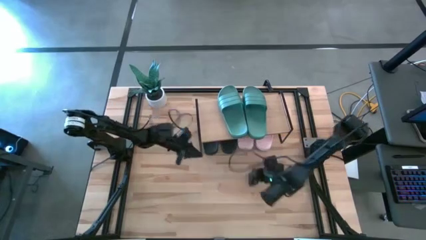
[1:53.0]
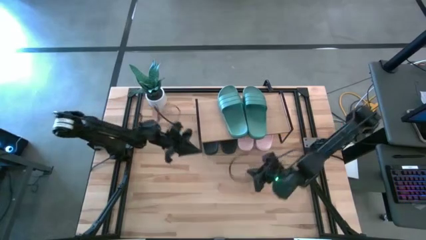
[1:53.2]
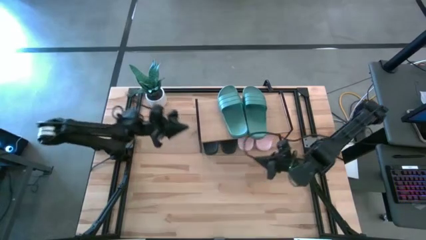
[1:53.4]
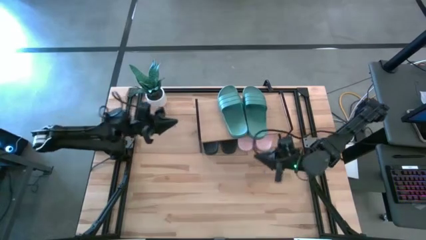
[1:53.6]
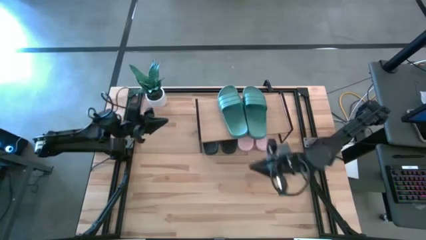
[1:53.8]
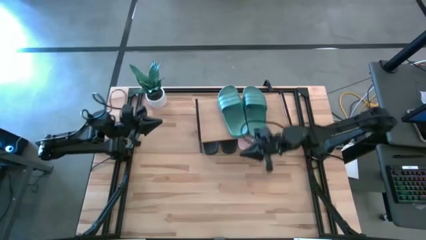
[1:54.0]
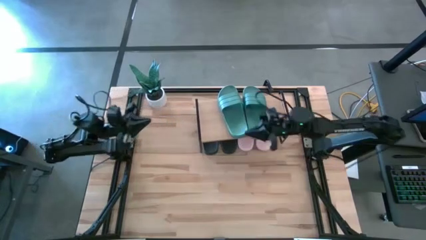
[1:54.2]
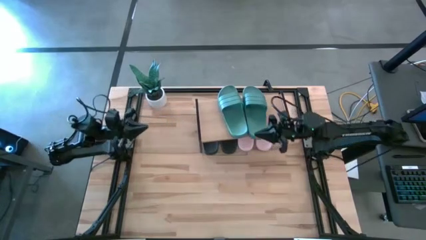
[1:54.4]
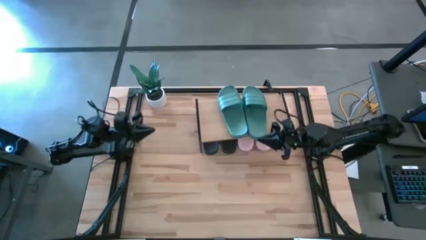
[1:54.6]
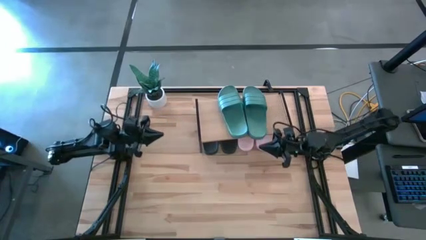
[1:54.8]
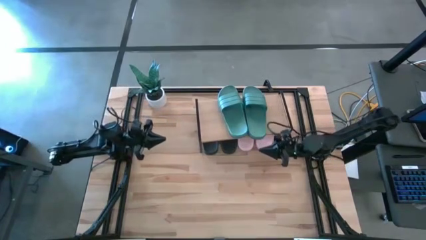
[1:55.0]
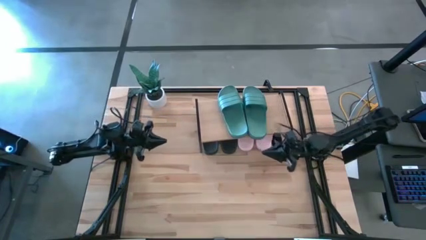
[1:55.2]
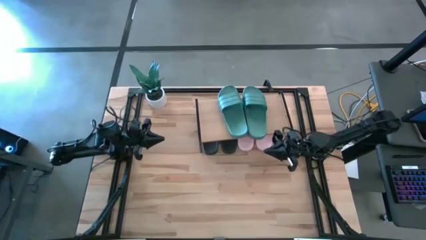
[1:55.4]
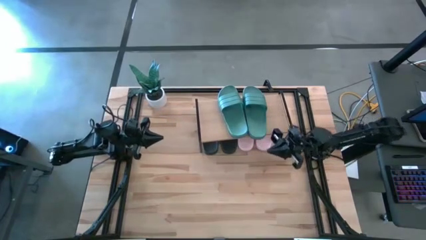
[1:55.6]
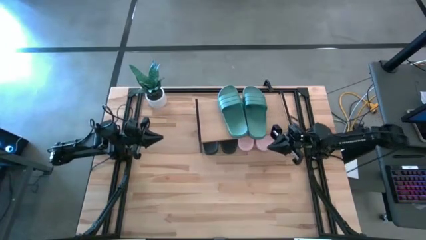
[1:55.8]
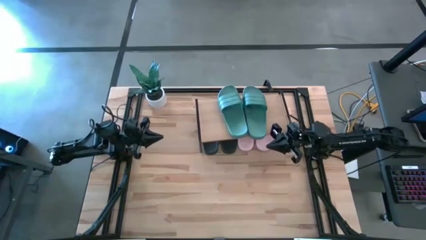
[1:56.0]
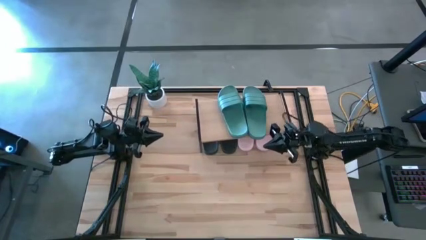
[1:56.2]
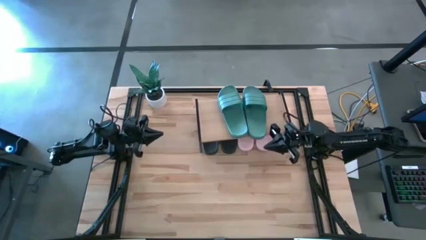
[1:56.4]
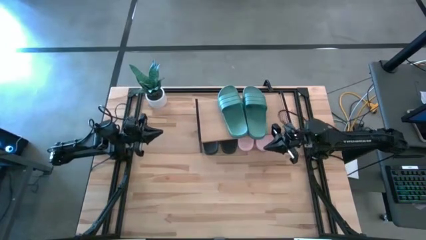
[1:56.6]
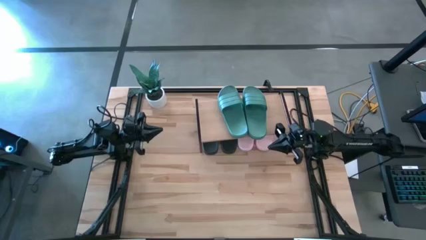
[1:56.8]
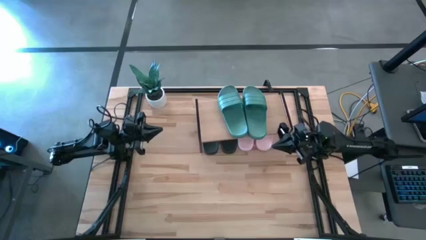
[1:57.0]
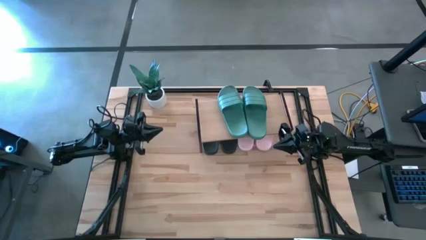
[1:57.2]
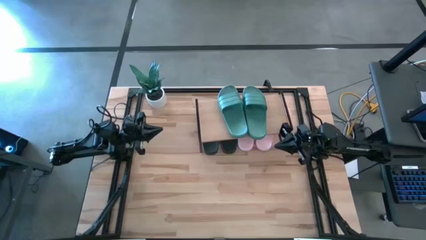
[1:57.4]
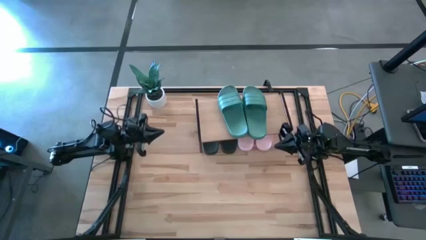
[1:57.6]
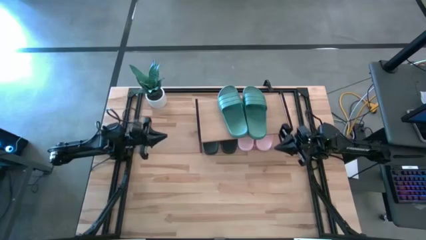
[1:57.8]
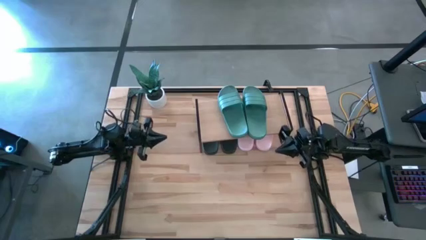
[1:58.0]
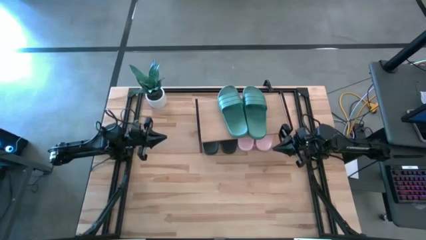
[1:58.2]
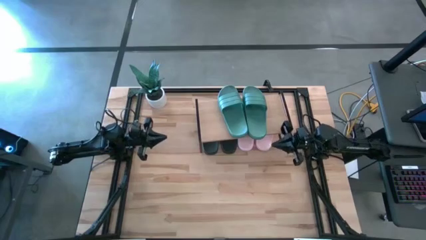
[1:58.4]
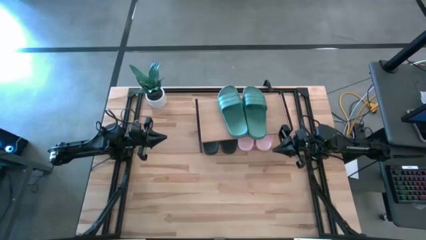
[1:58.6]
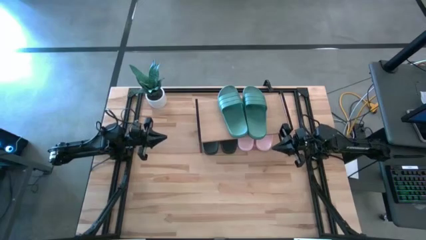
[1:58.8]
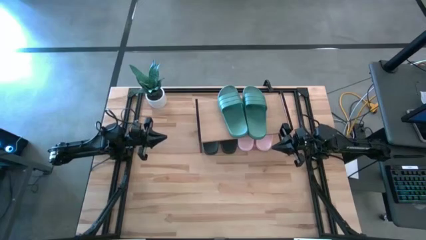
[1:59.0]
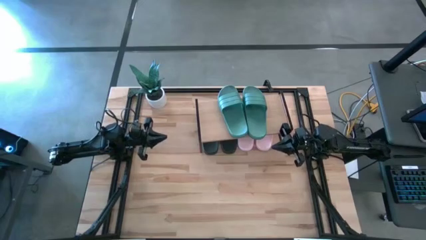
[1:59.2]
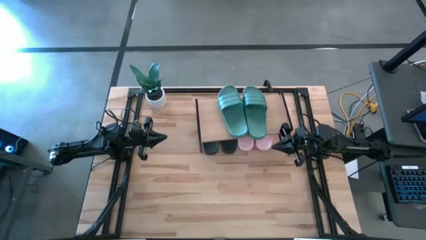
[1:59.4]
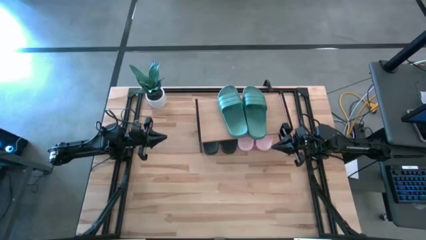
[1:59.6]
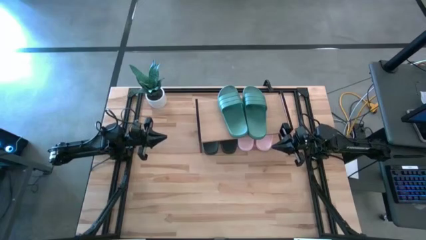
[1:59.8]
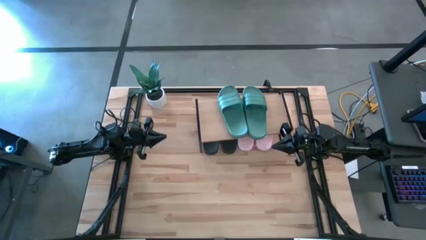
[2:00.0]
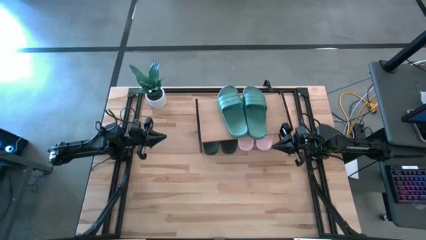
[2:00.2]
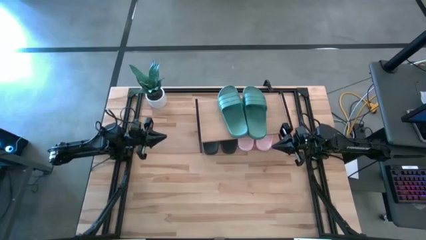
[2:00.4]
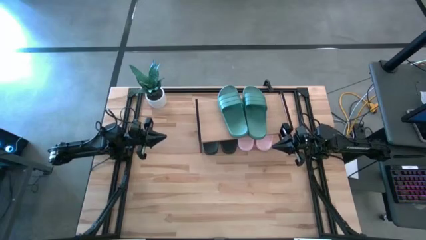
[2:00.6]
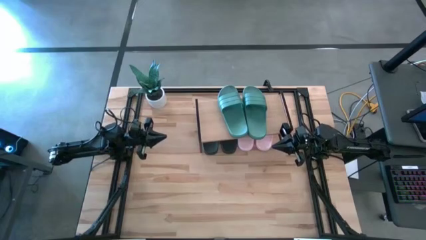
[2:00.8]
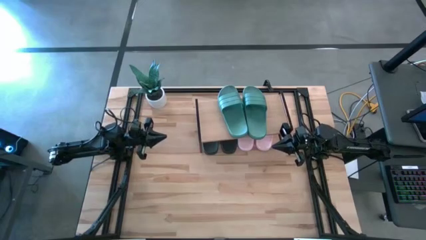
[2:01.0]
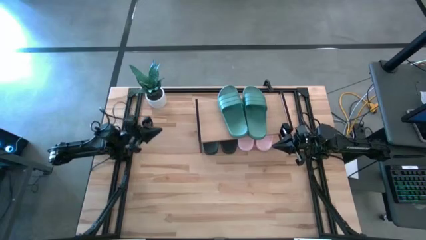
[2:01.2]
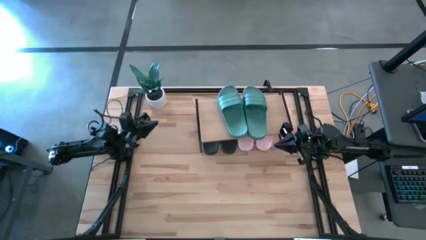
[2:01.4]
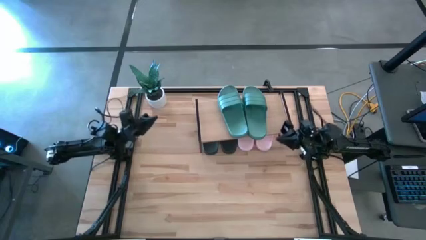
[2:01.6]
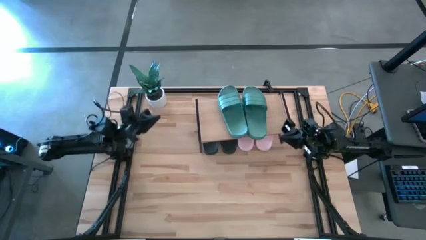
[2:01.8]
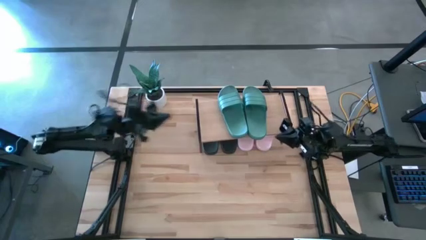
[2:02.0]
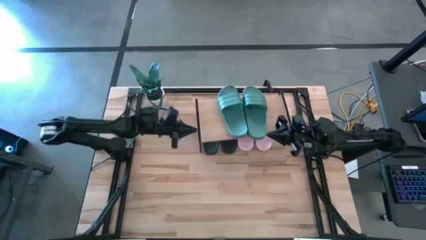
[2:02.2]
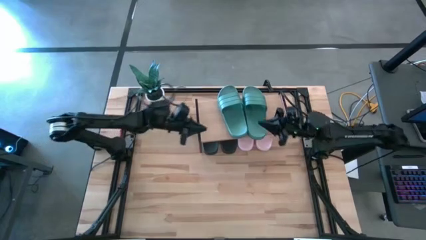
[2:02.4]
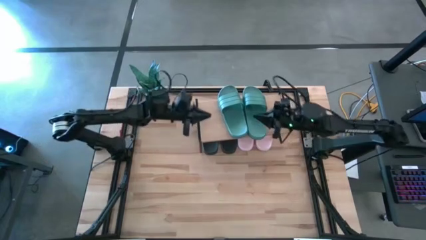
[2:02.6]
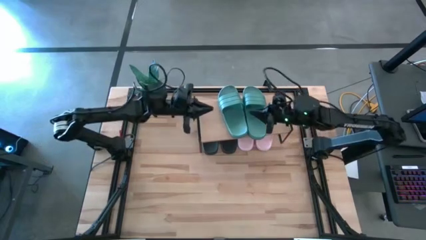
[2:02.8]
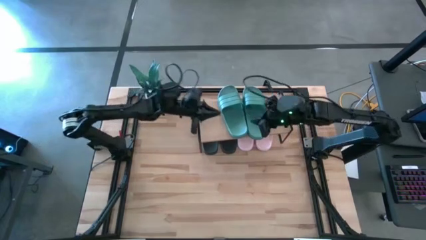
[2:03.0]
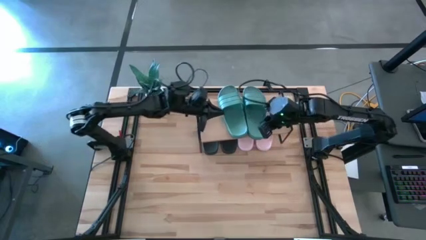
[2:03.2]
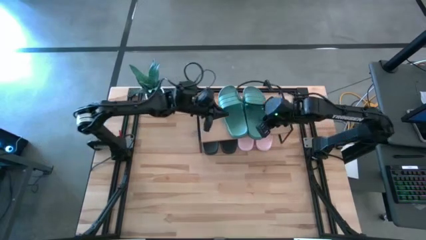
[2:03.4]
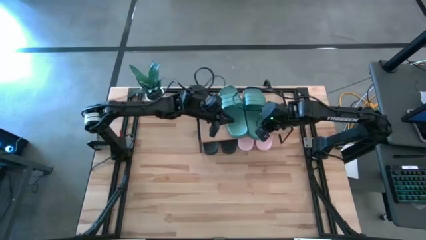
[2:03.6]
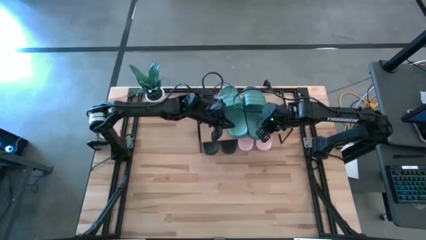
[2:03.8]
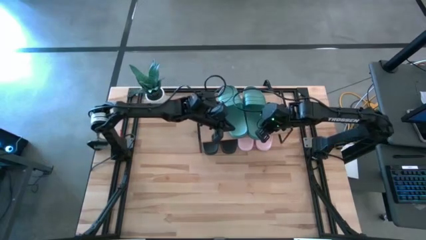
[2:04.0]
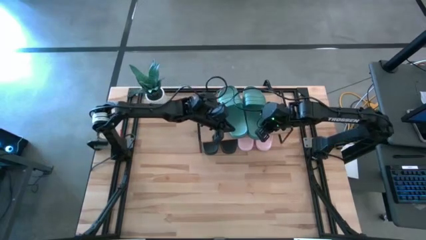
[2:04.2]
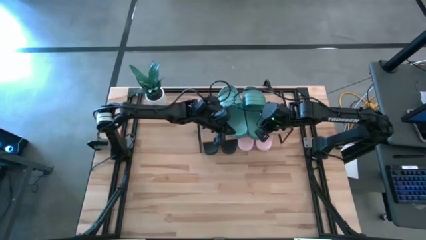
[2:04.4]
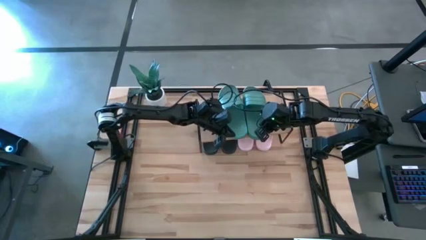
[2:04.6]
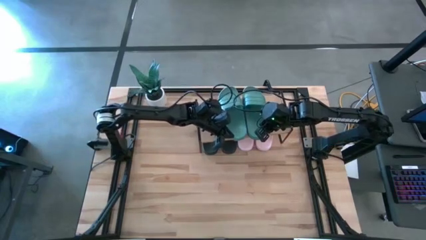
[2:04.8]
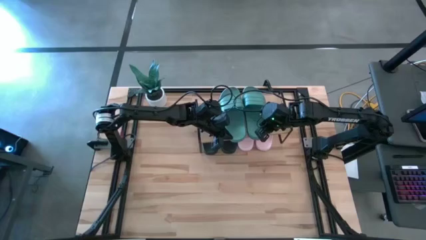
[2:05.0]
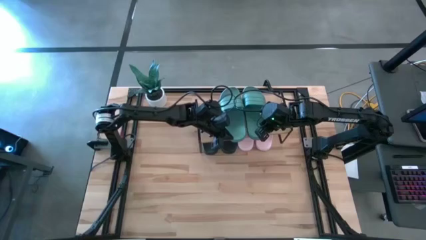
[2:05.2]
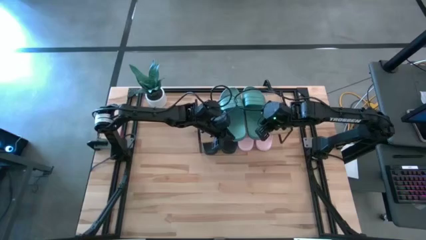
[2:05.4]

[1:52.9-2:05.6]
Task: Pick and place slides into the shelf
Adjust the green slippers on the shelf

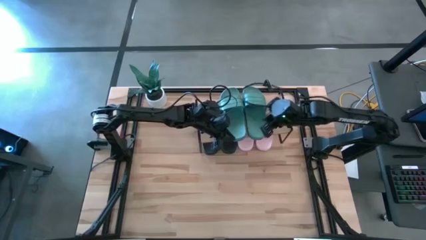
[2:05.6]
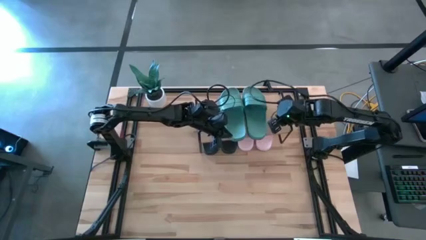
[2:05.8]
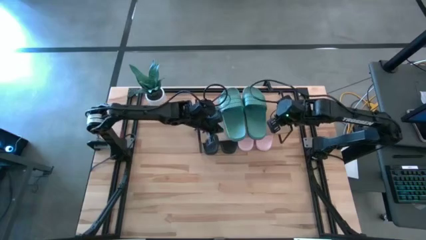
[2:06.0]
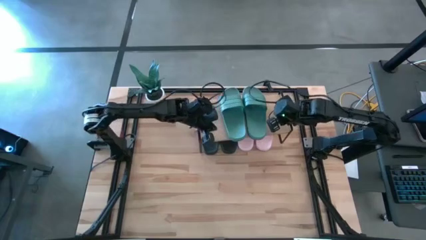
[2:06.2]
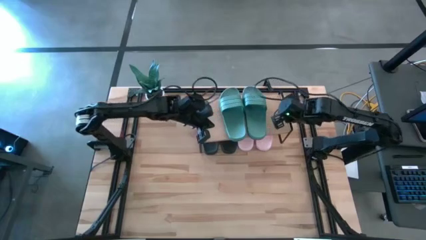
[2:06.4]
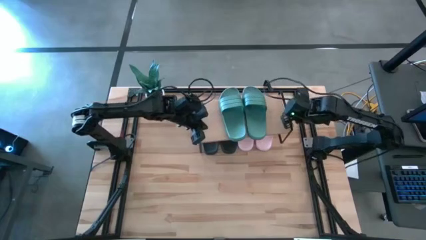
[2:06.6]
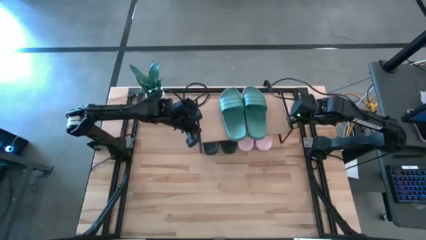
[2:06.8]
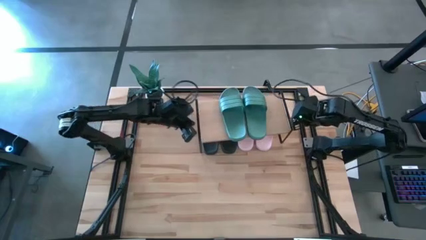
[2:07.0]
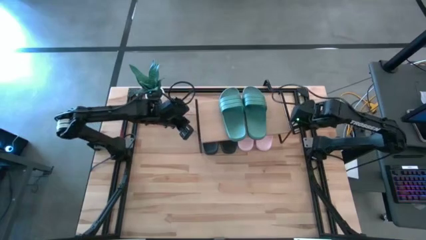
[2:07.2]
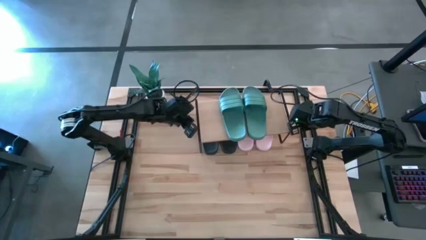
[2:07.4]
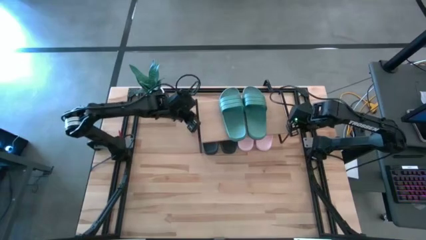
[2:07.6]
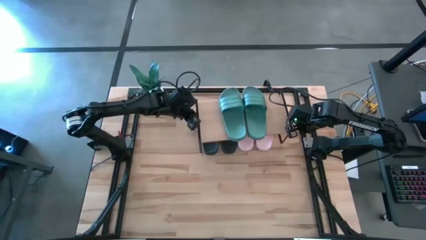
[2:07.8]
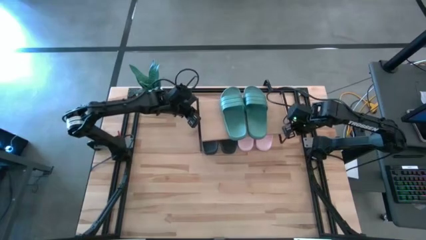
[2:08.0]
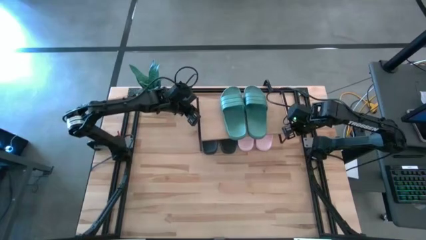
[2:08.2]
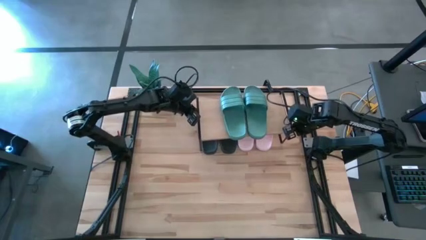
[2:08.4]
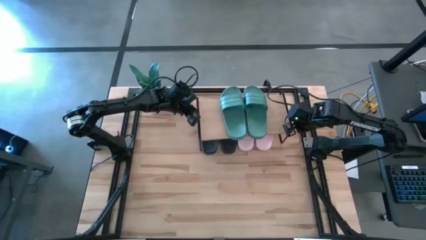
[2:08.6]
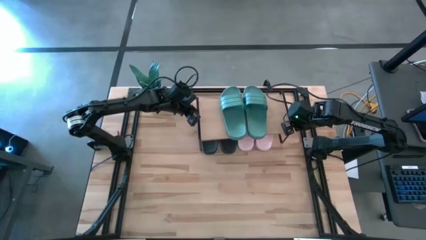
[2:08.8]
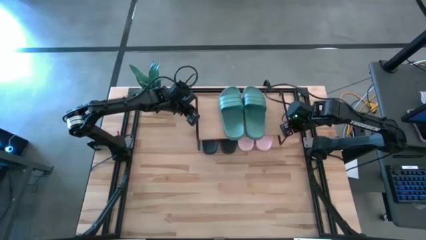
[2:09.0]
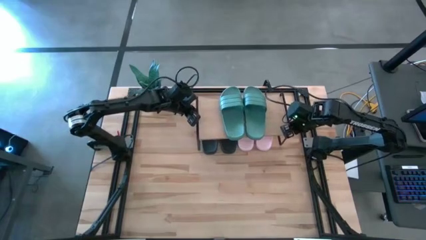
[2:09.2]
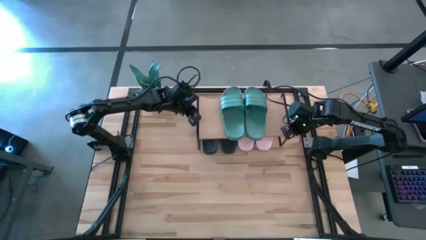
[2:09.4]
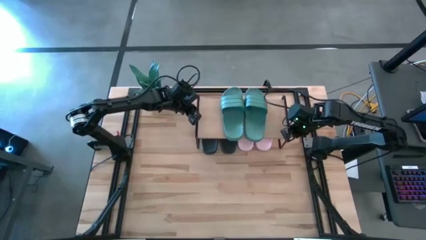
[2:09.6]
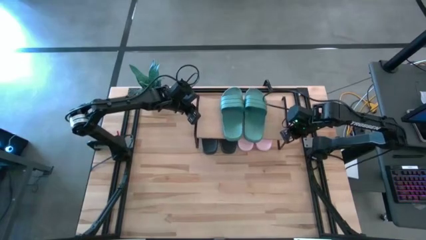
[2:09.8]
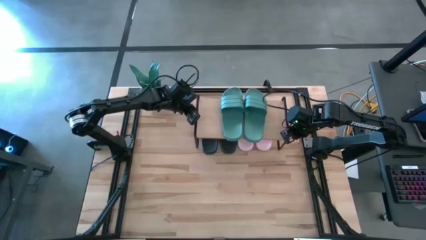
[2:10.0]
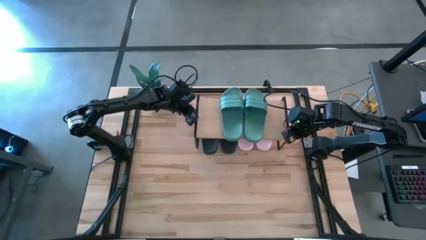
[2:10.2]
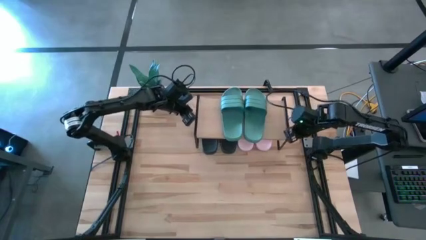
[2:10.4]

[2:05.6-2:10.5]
Adjust the shelf
